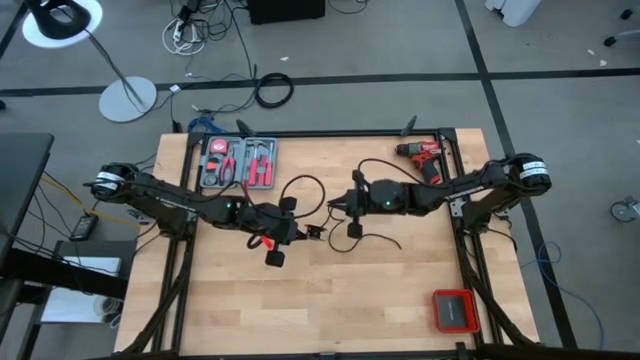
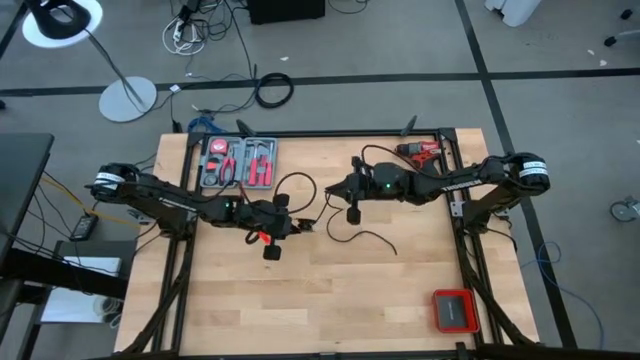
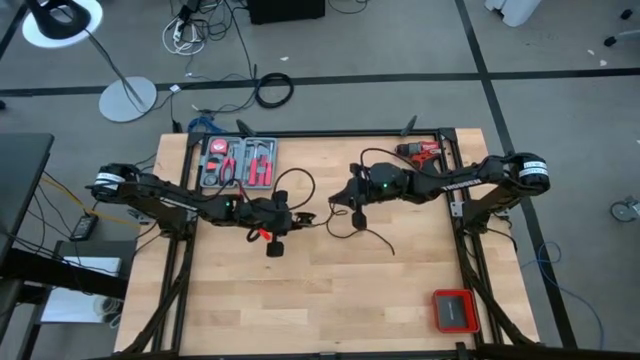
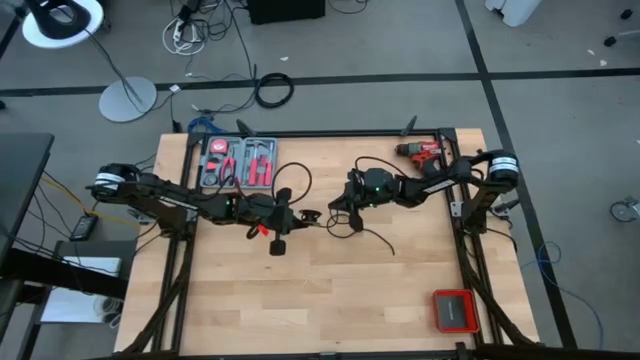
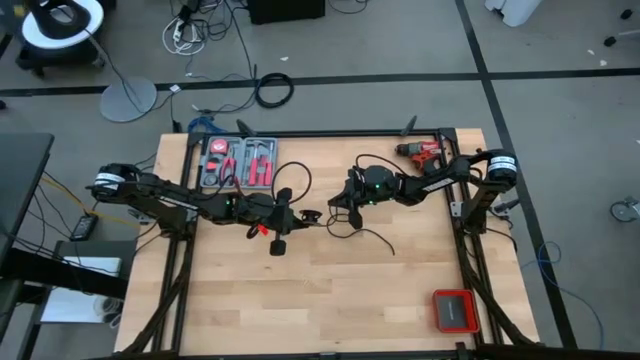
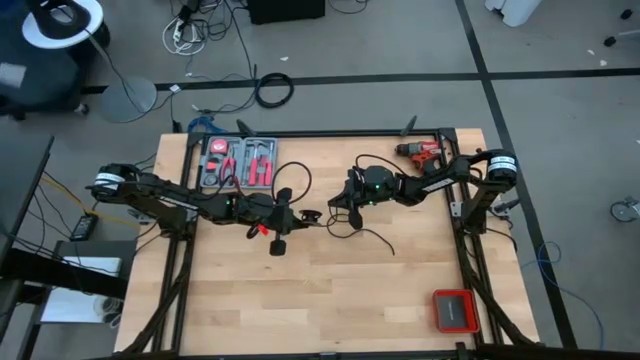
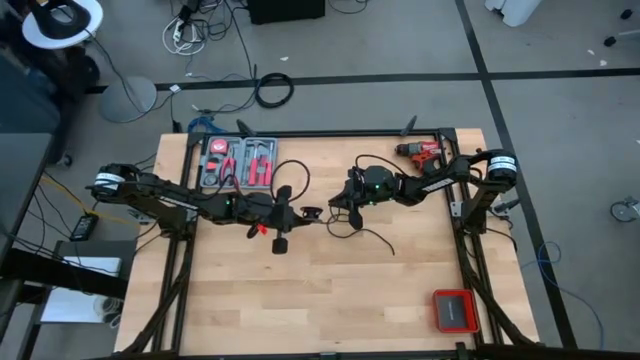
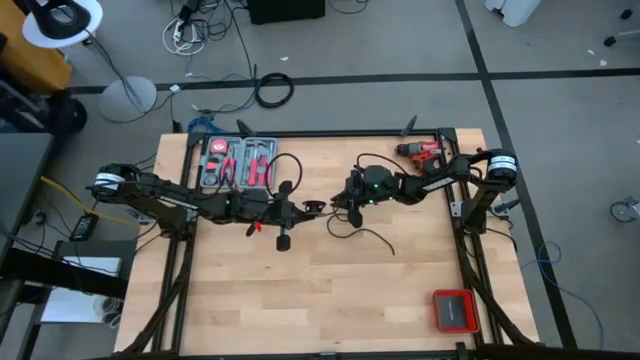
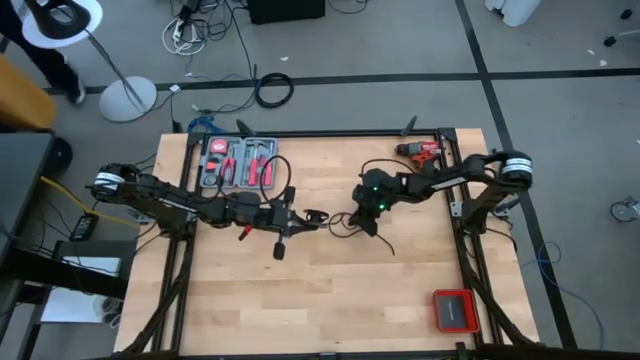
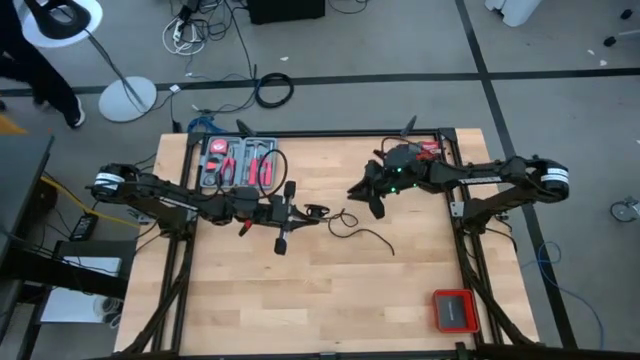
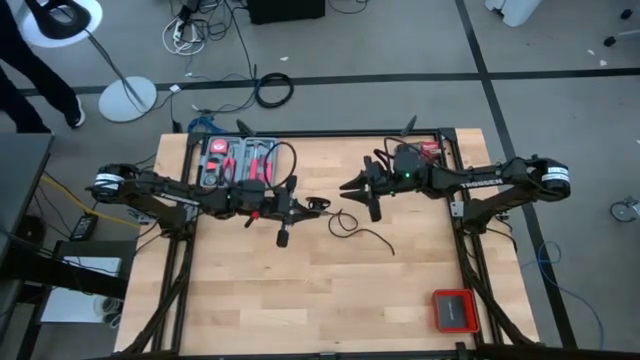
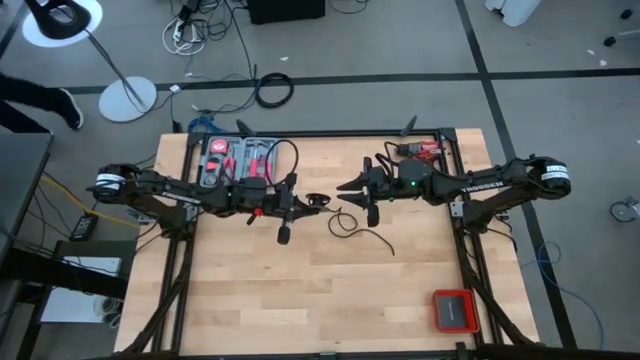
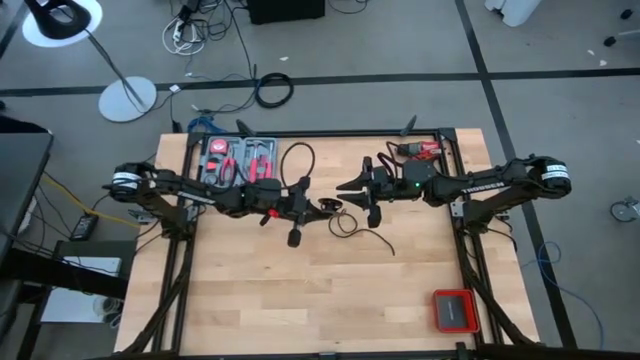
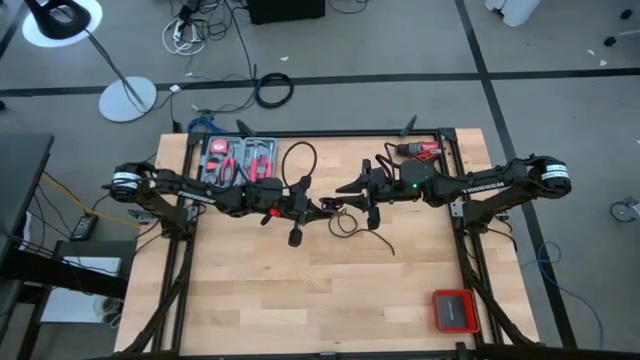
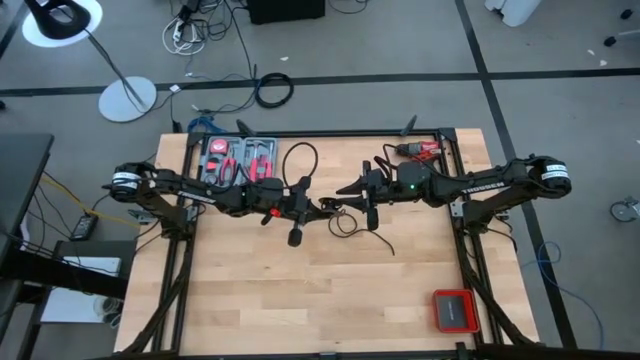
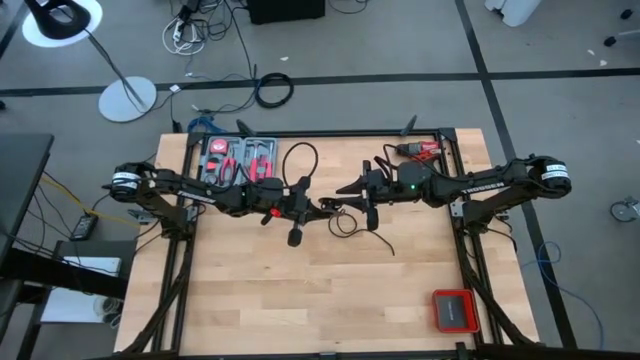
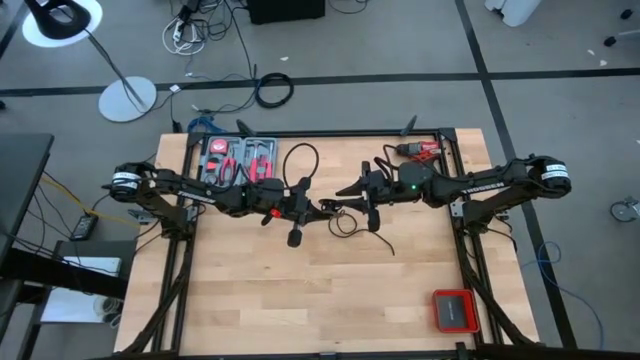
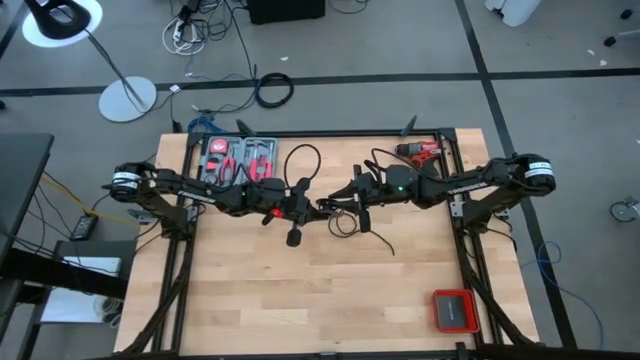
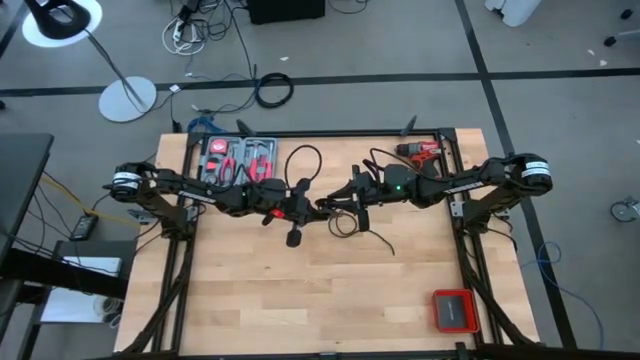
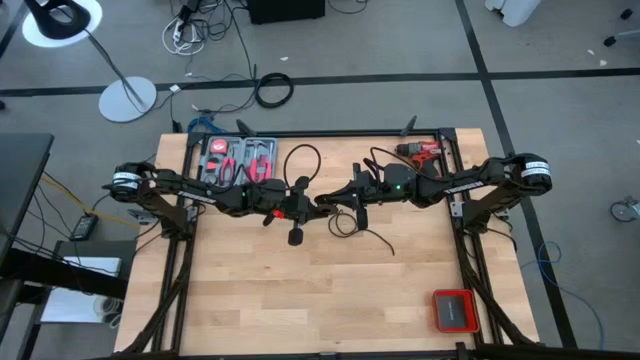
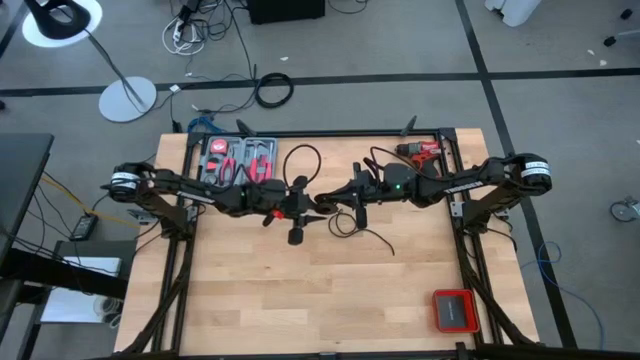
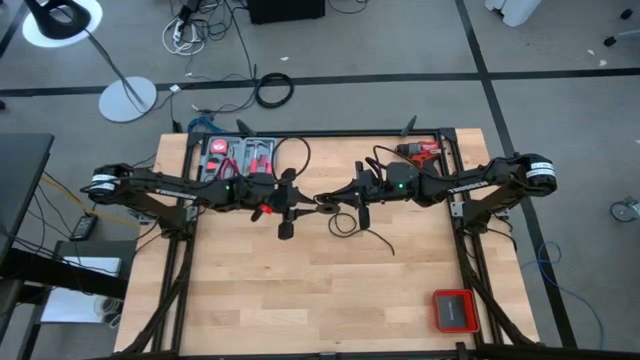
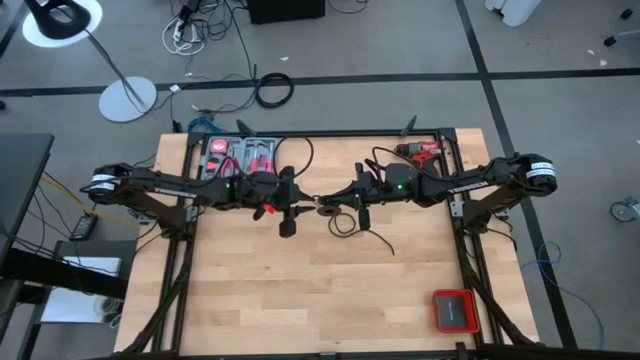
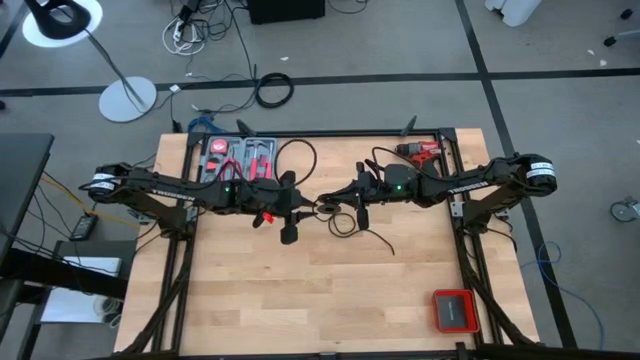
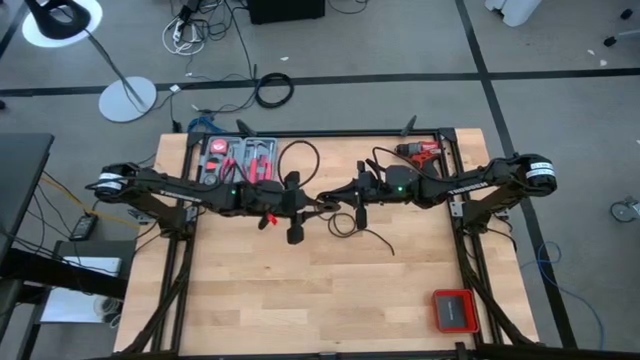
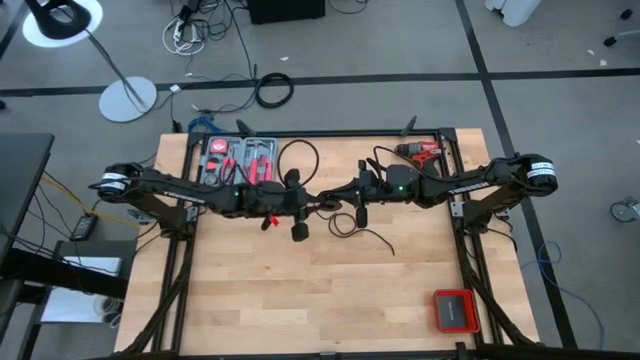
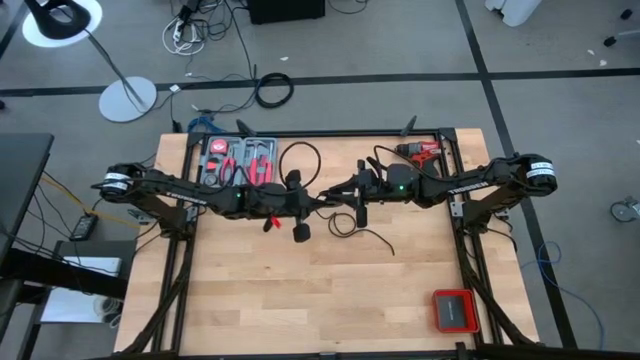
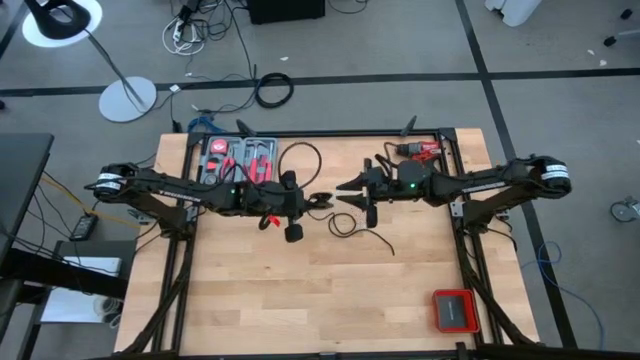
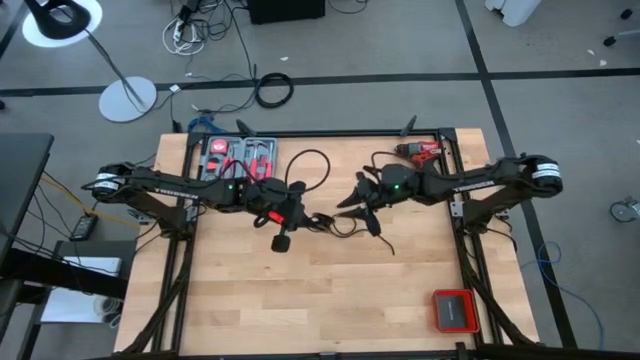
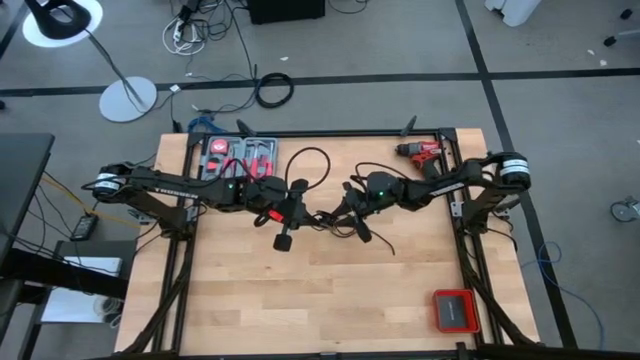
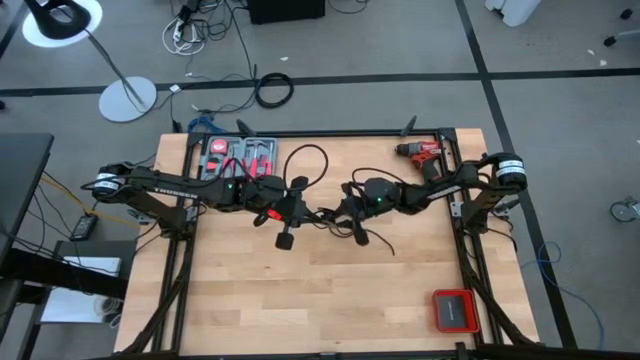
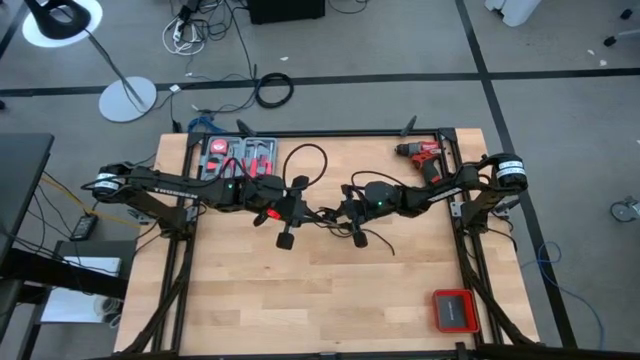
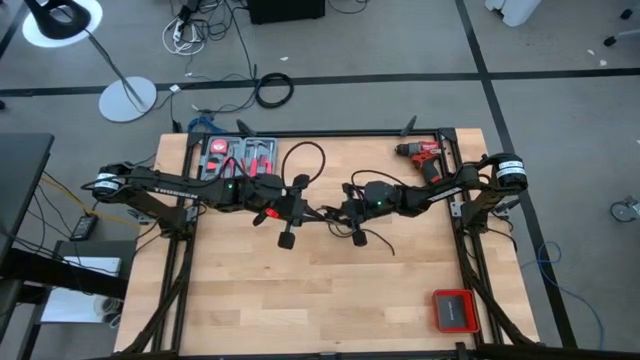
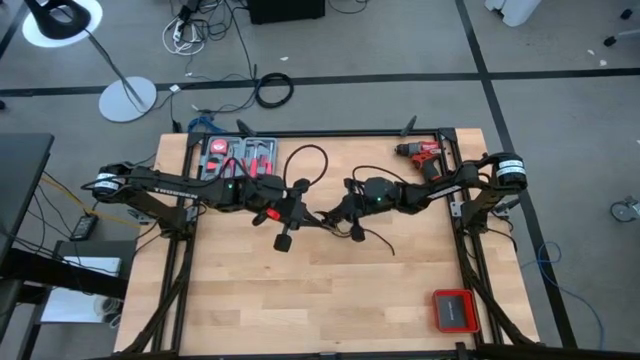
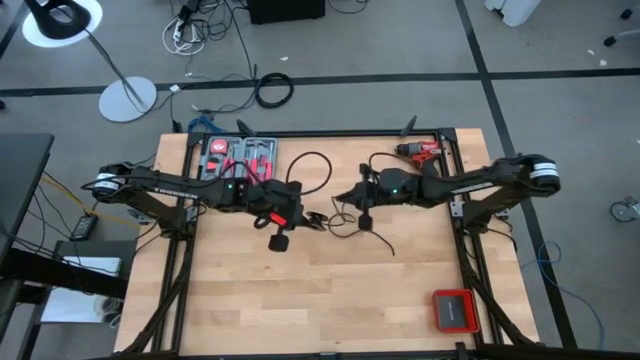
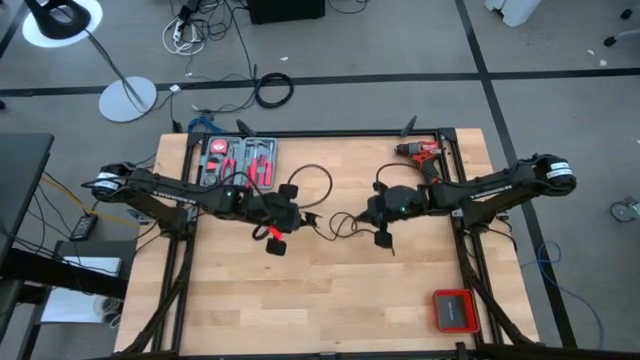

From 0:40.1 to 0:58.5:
Task: Coil cords
Uncoil the black wire from the black spool

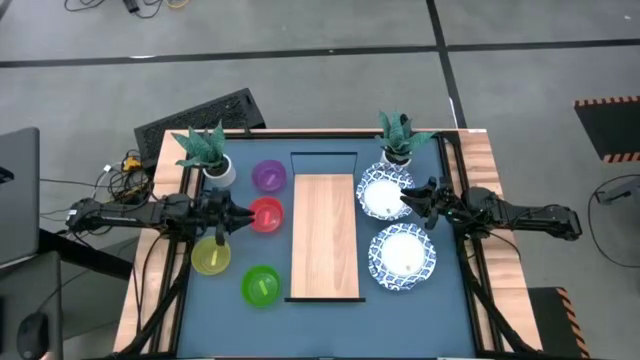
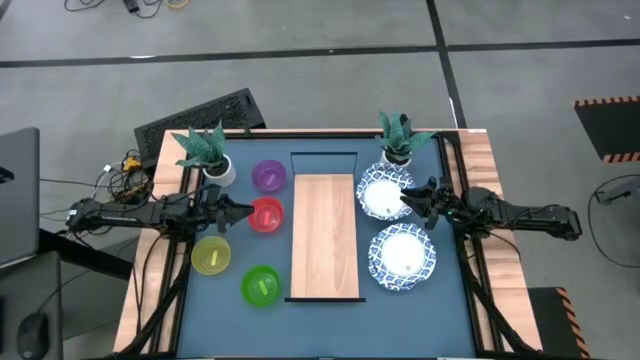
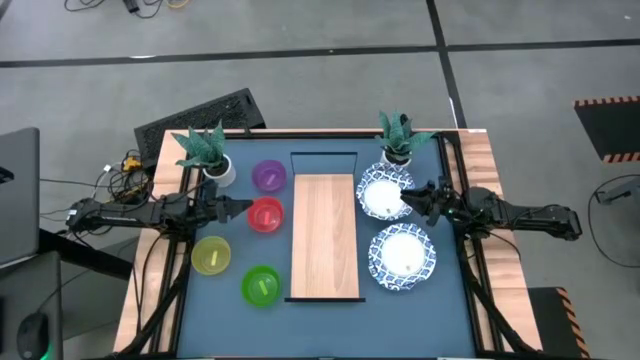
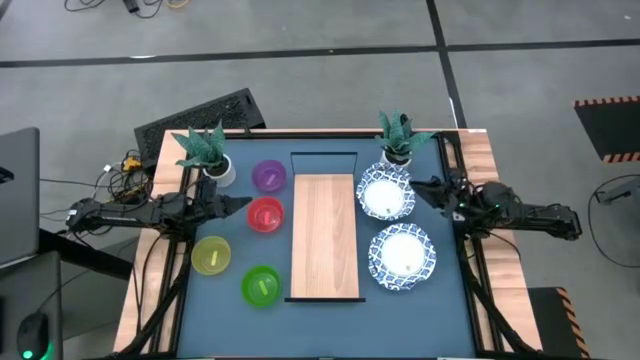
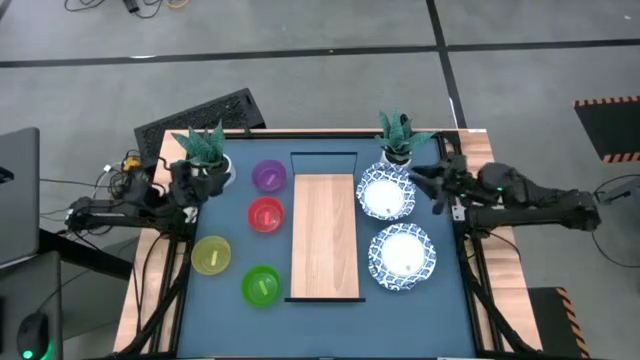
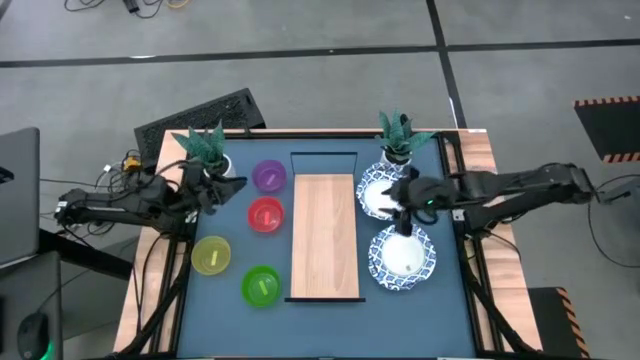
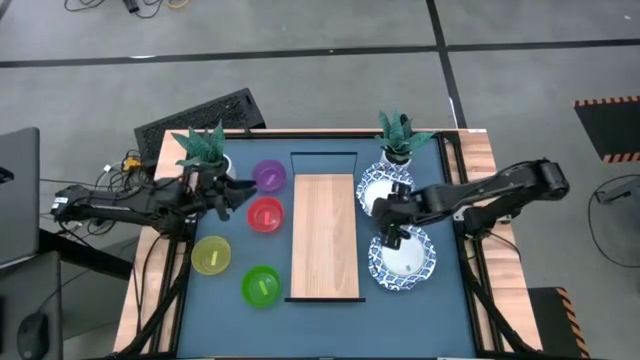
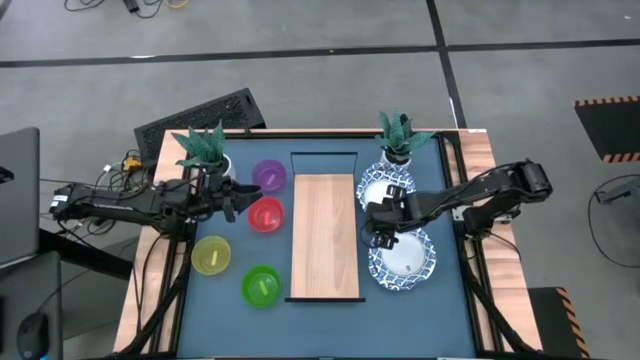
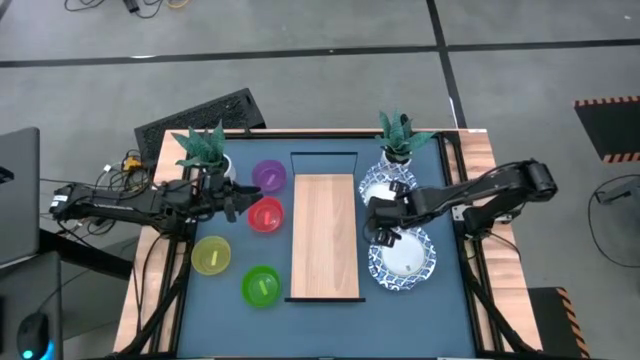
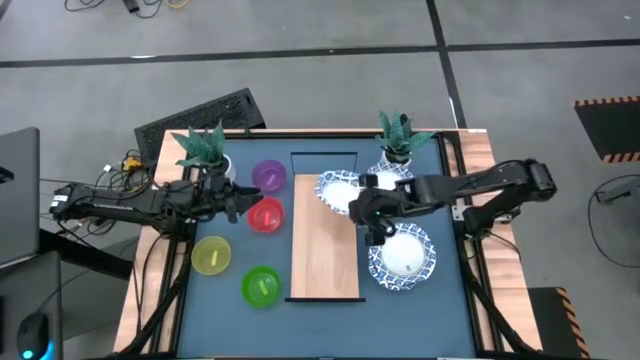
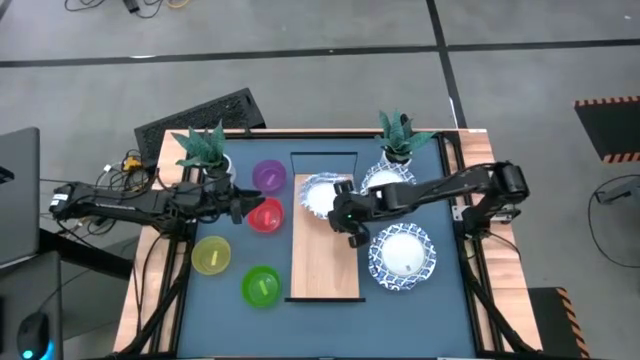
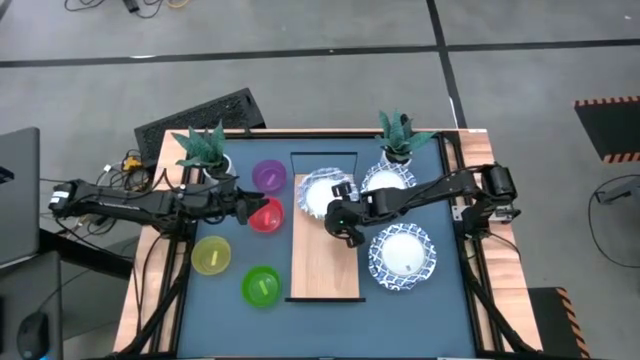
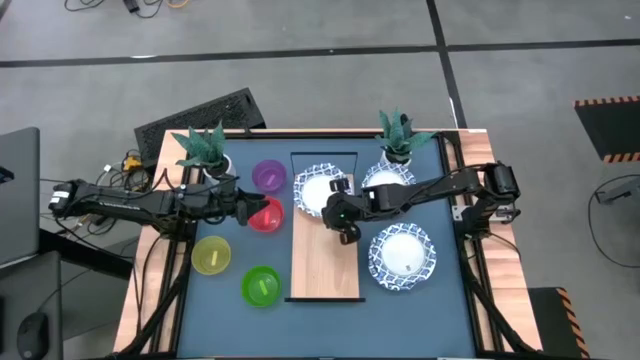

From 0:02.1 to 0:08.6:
Task: Place and stack bowls onto a shelf
Put the white patterned bowl on the shelf
